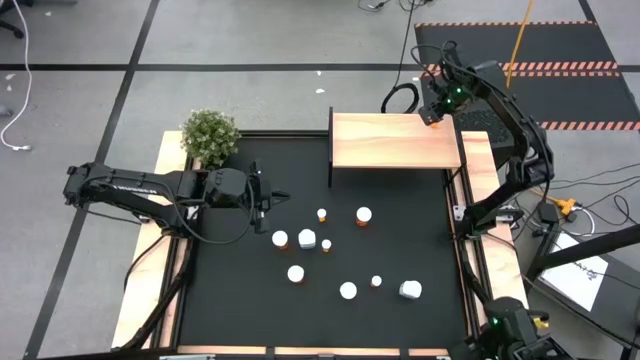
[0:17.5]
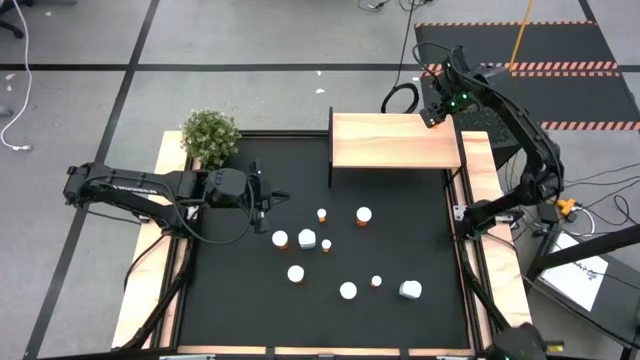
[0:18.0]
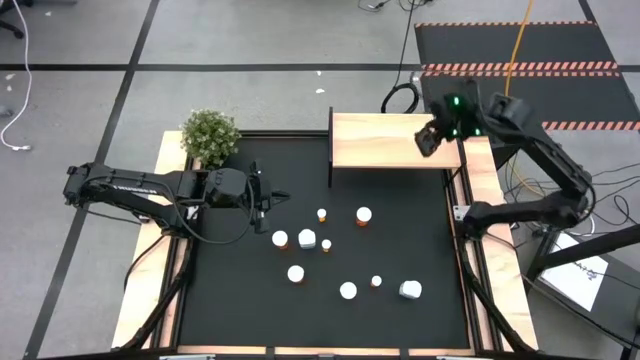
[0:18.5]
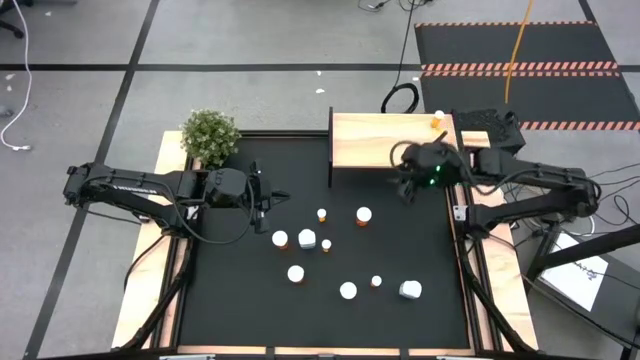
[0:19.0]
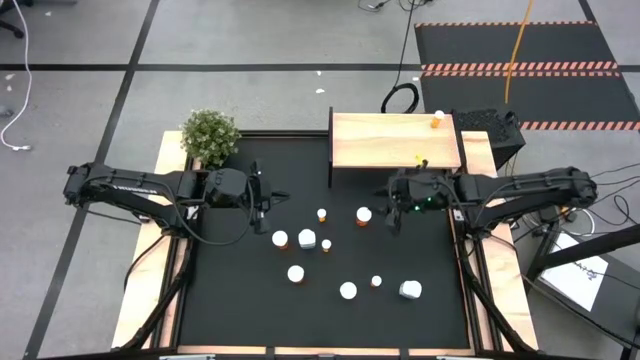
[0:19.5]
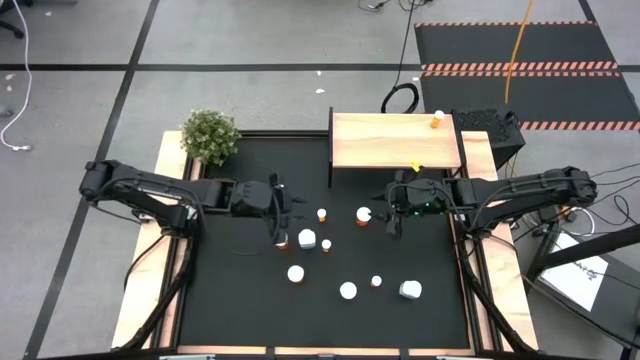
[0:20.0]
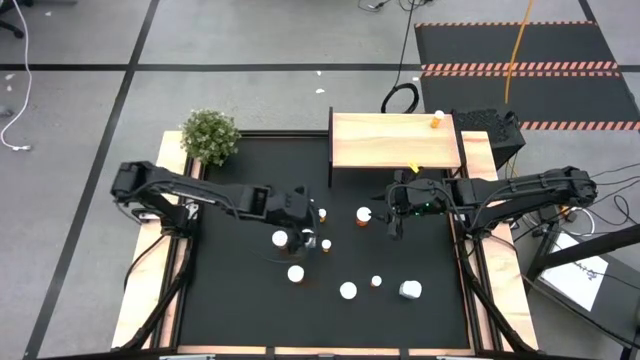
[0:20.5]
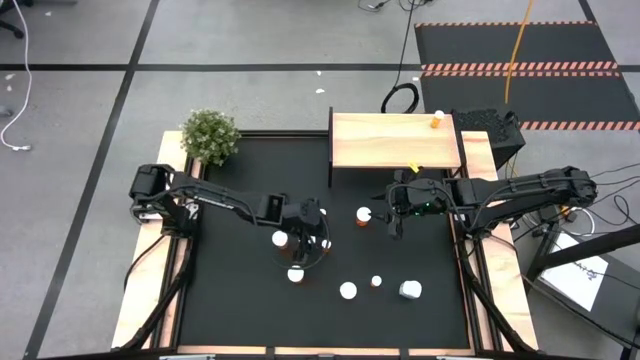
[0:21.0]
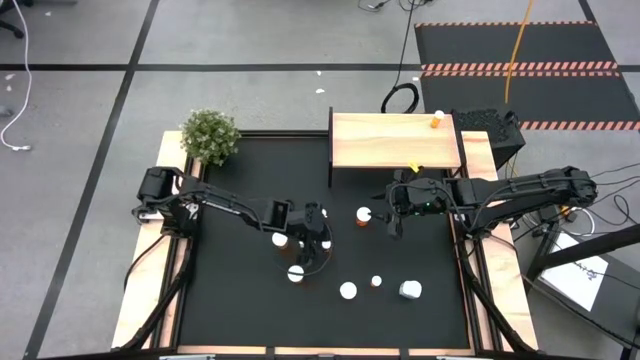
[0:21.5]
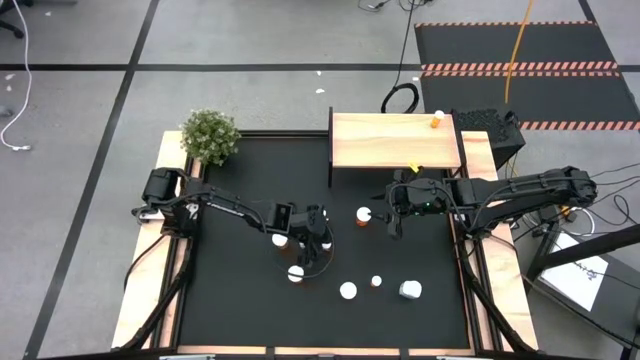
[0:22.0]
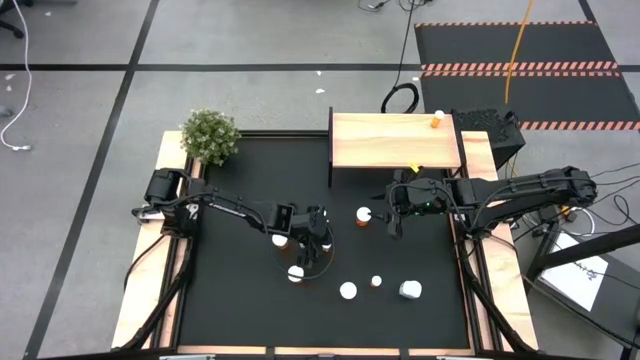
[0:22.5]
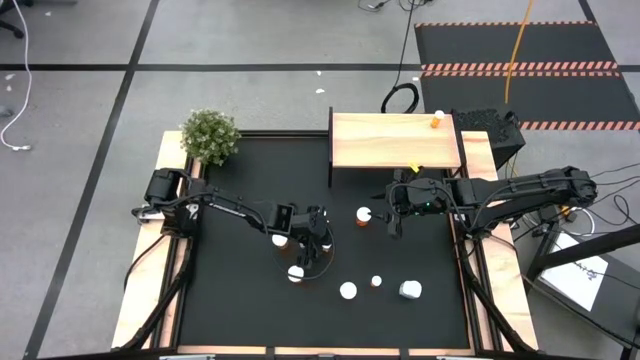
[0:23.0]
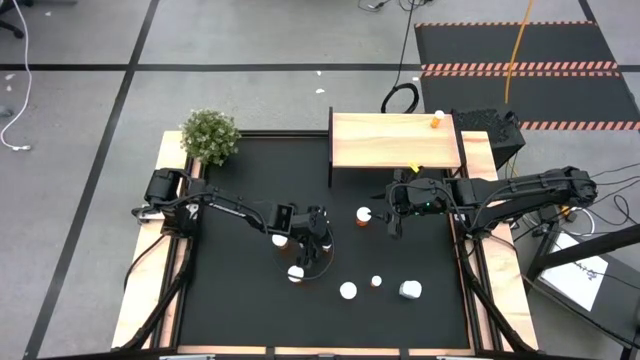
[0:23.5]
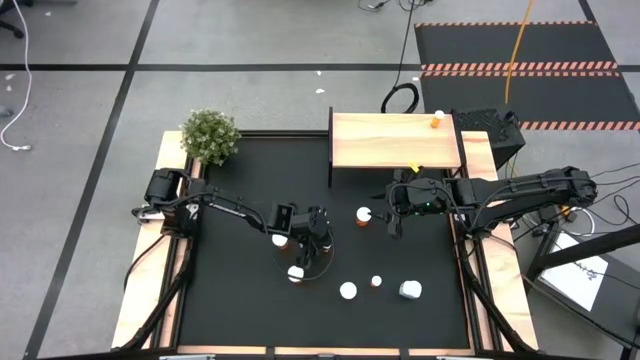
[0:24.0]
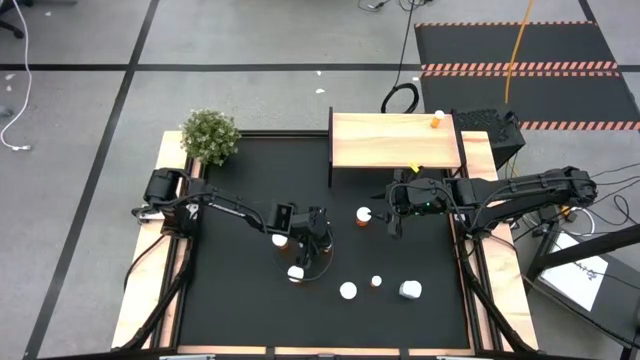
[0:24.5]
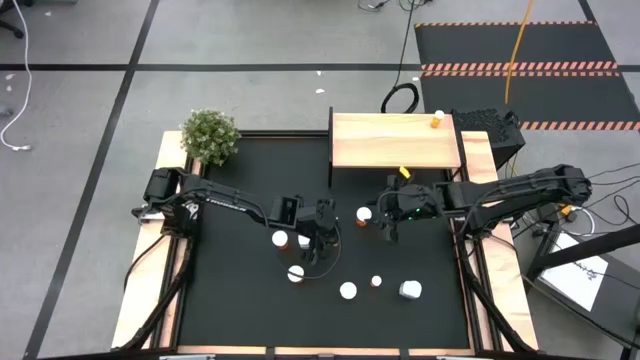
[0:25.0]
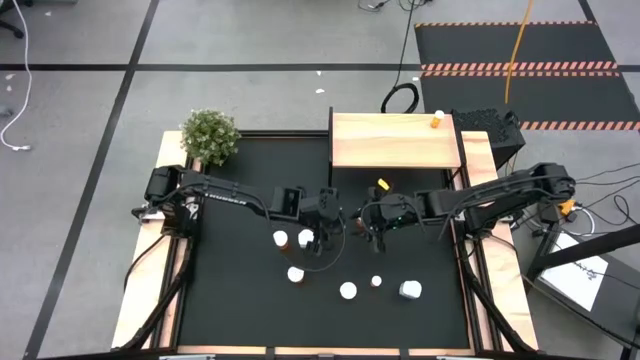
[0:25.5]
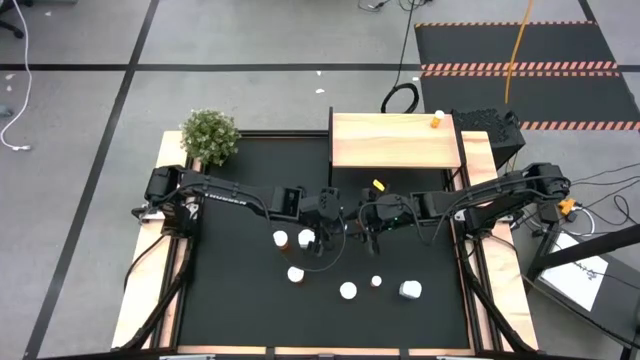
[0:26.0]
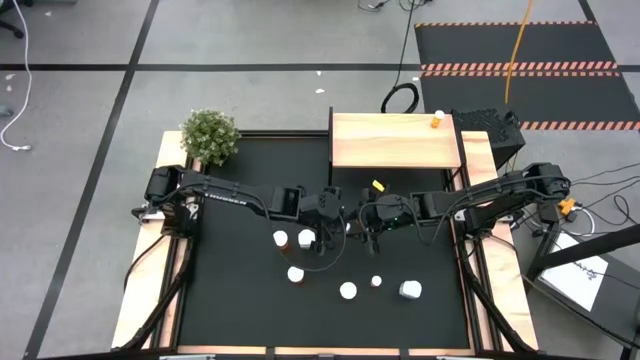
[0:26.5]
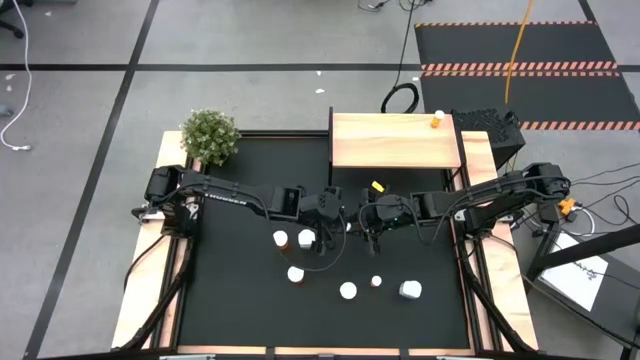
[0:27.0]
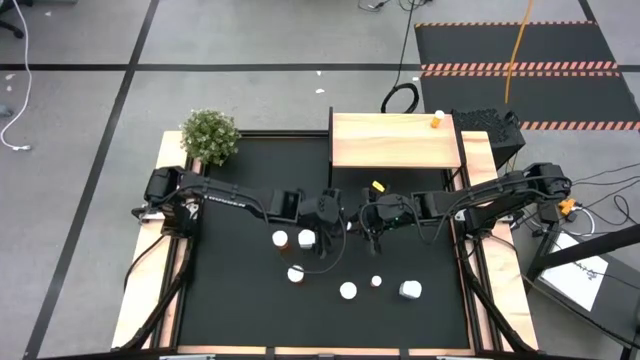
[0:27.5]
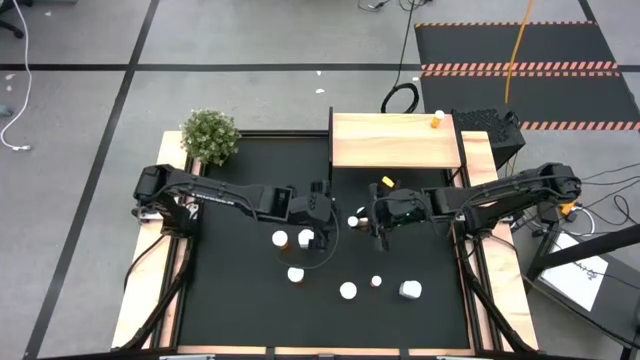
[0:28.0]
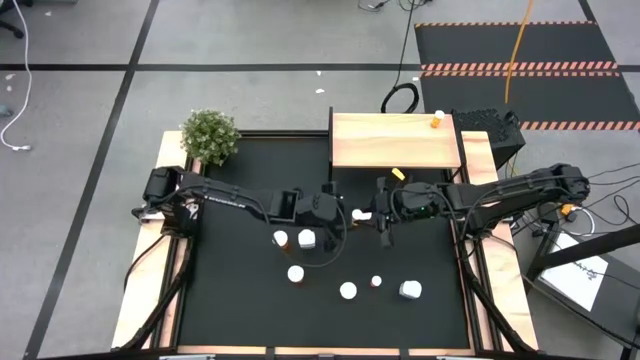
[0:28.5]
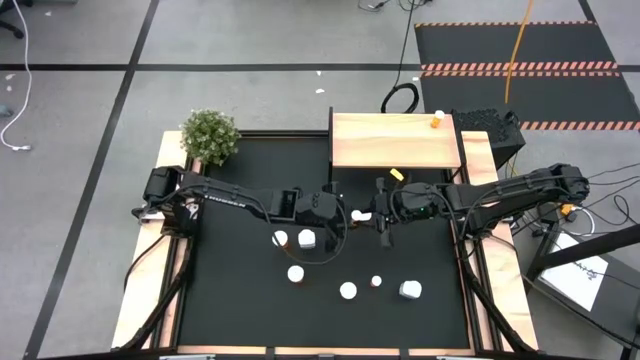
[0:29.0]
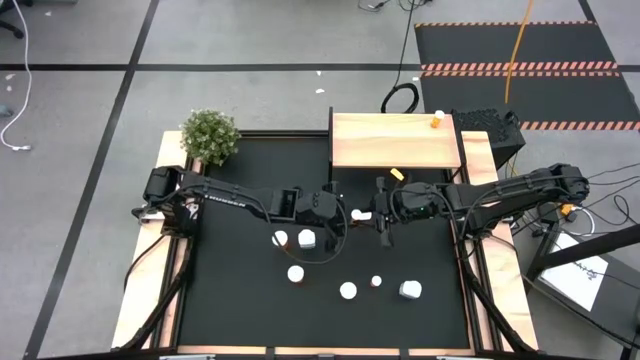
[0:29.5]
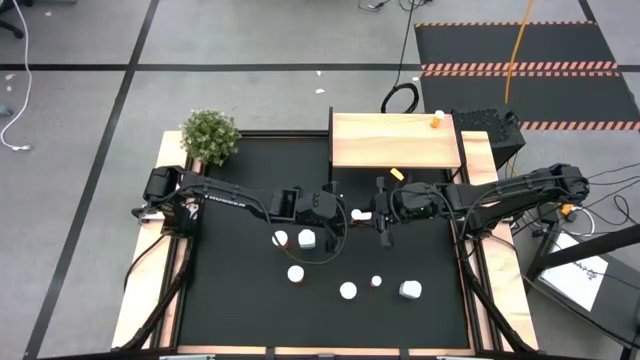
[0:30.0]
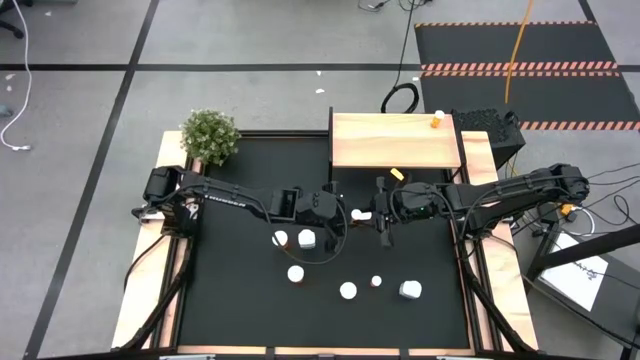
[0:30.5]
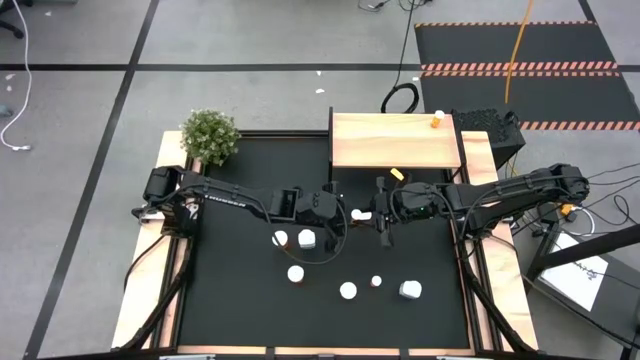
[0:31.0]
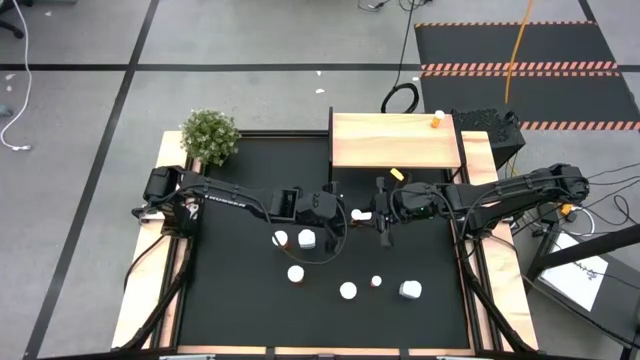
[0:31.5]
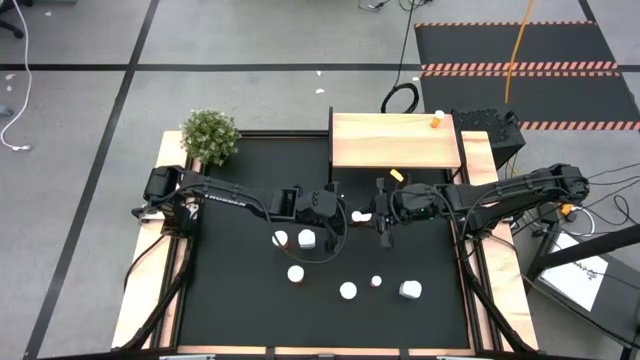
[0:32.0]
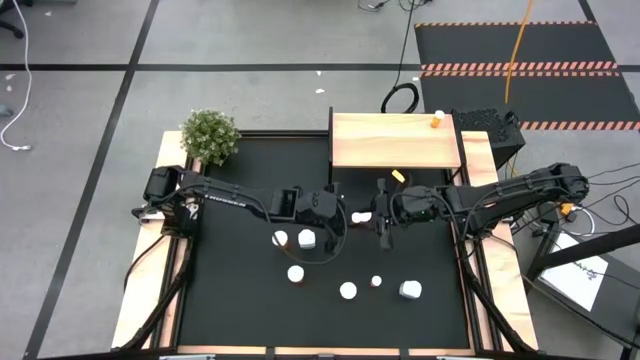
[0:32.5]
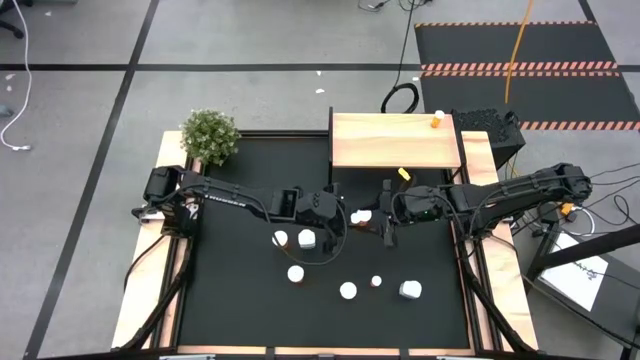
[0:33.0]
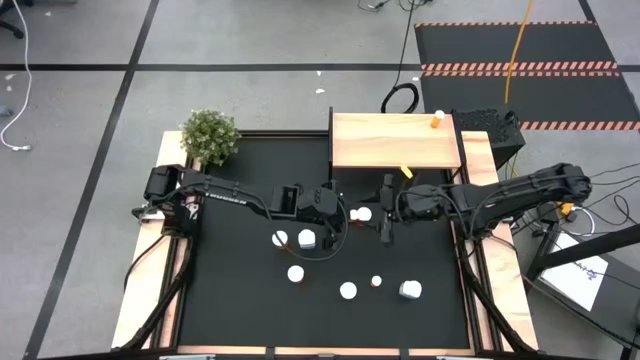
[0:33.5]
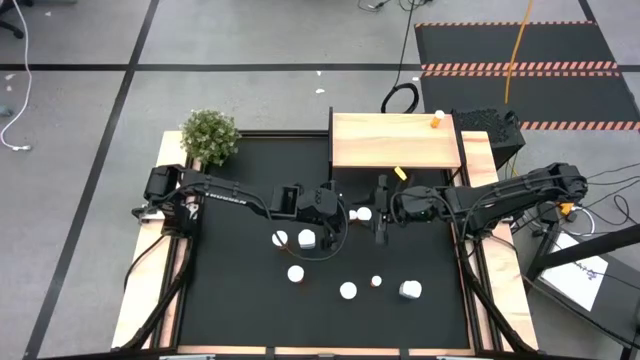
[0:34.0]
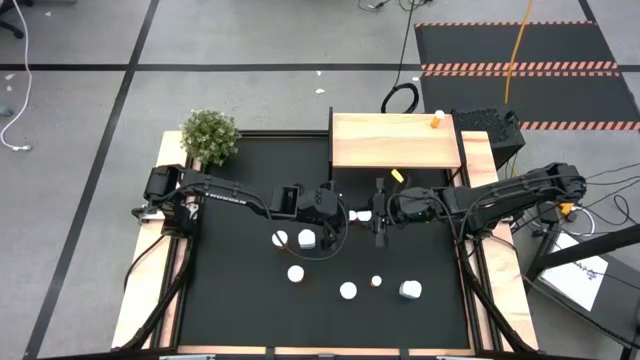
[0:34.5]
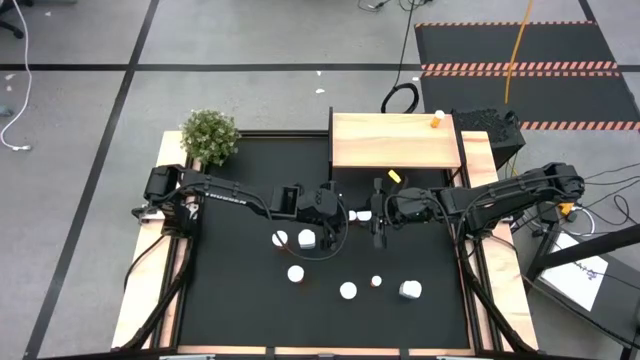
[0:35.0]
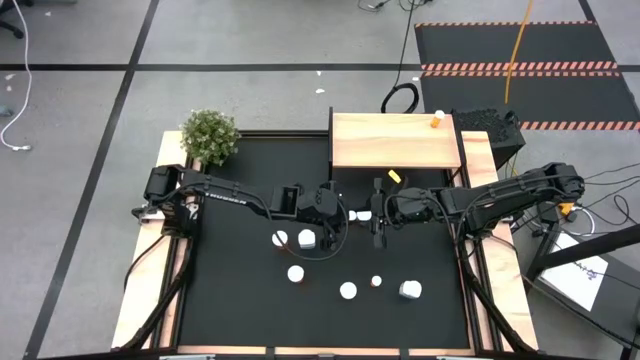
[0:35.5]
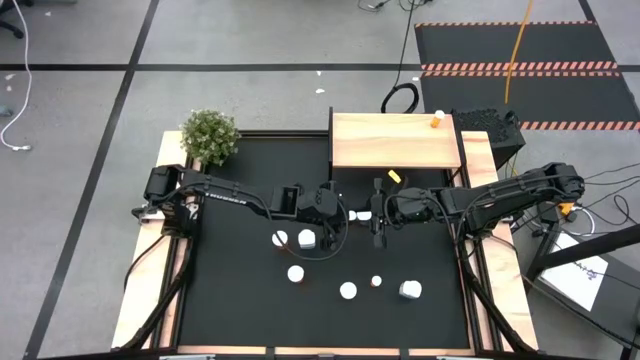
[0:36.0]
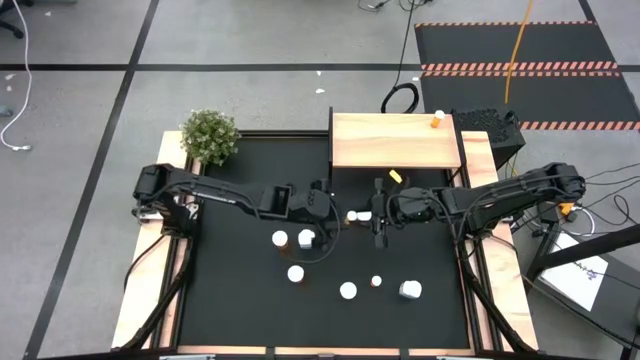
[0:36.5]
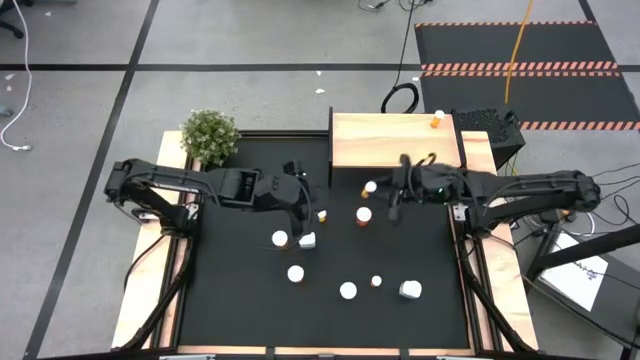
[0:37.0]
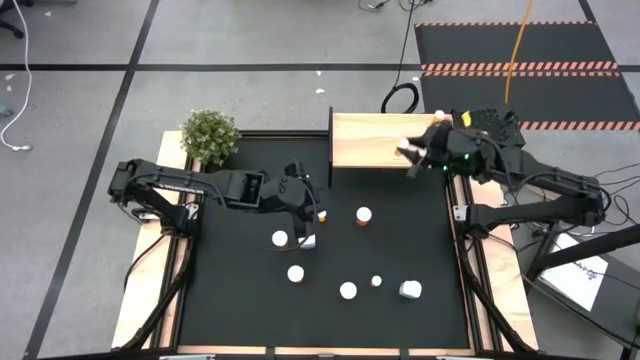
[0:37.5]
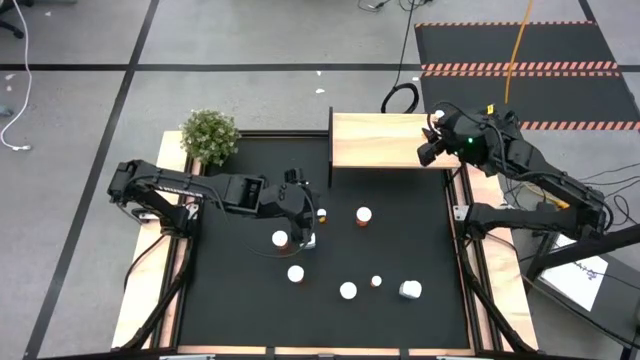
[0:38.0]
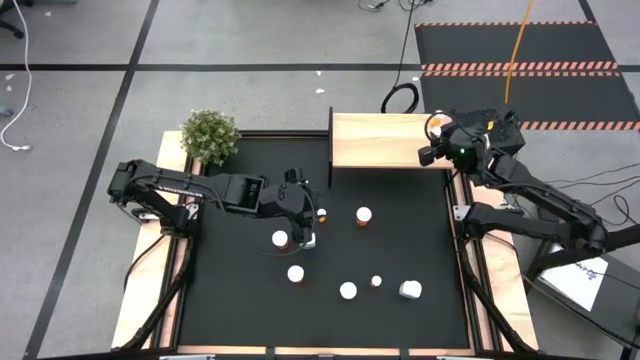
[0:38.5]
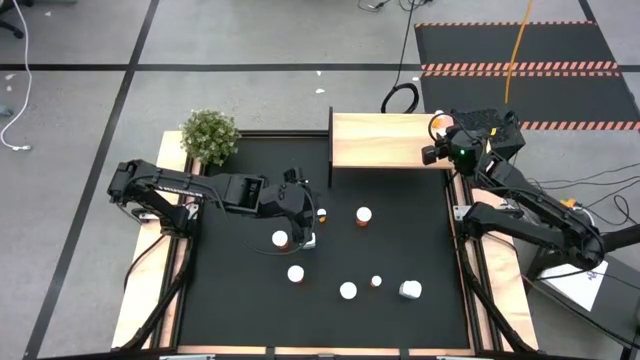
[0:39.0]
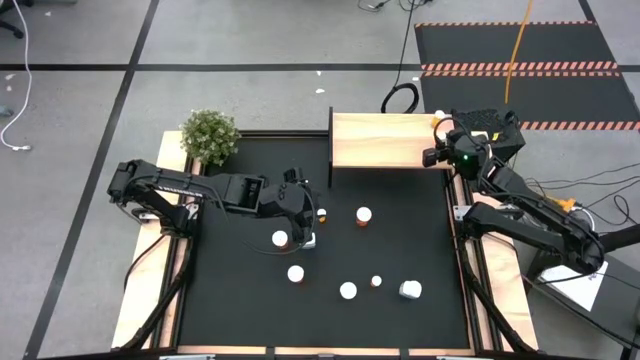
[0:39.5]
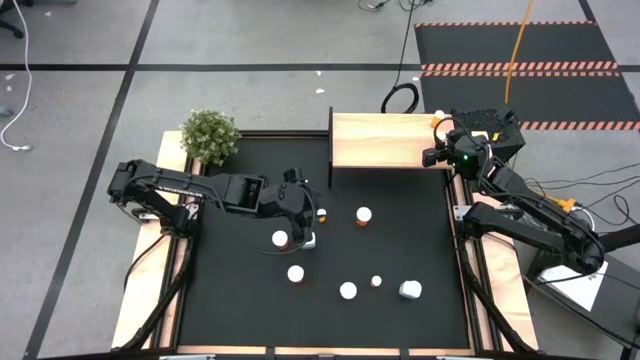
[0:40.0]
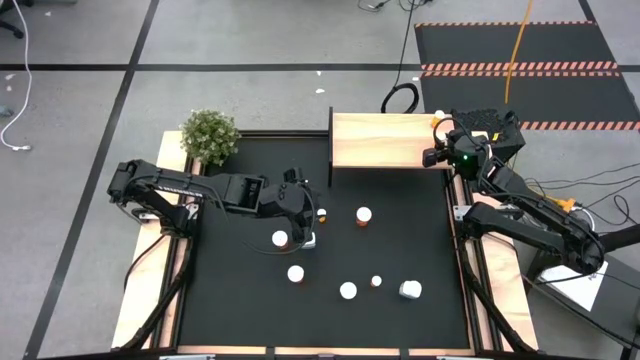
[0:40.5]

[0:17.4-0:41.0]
Task: Pick and place medicine bottles onto shelf by color
Put the small orange pill bottle on the shelf
